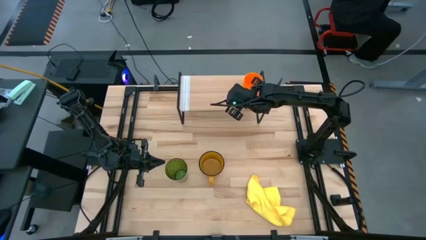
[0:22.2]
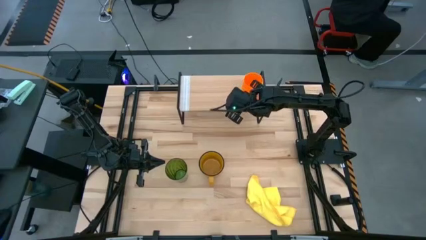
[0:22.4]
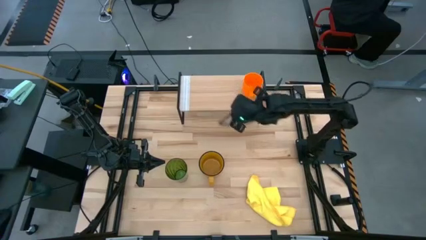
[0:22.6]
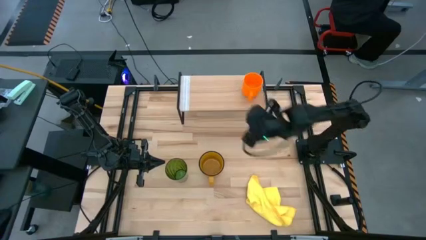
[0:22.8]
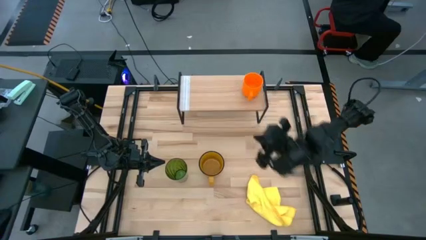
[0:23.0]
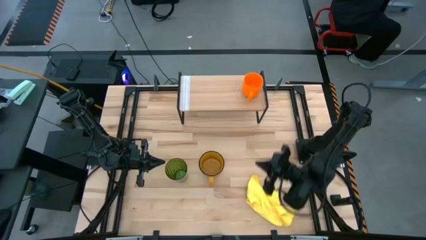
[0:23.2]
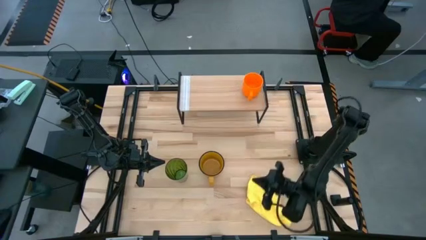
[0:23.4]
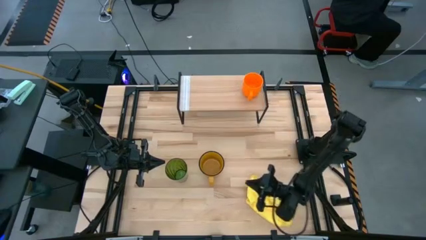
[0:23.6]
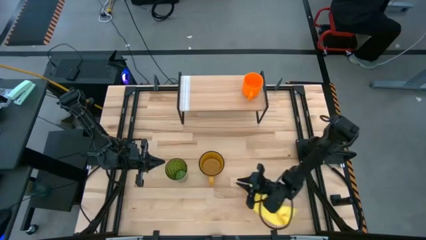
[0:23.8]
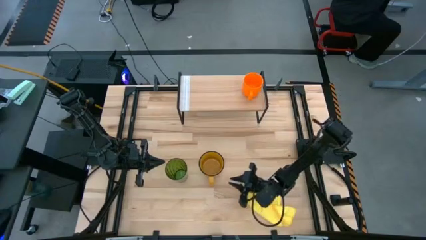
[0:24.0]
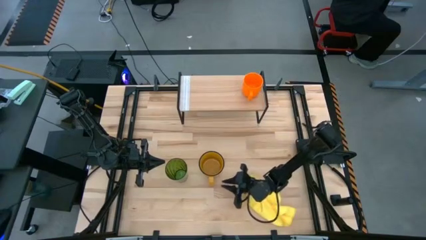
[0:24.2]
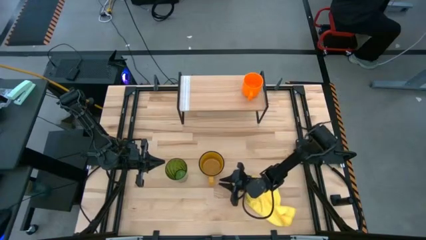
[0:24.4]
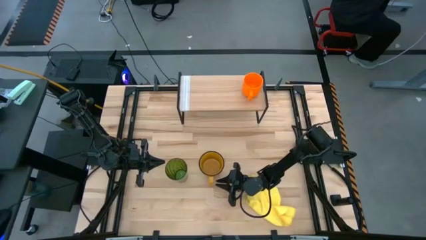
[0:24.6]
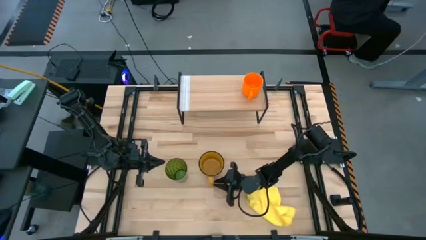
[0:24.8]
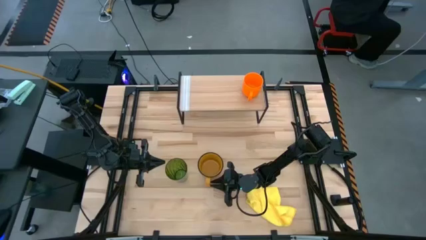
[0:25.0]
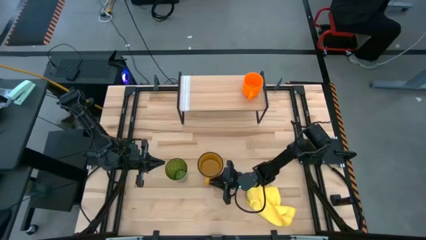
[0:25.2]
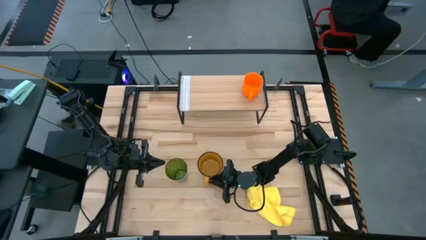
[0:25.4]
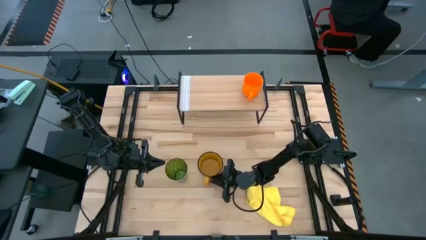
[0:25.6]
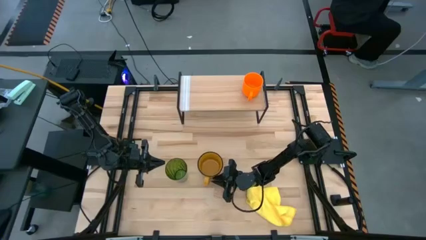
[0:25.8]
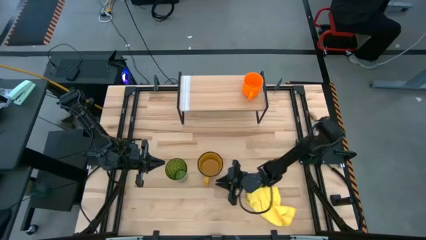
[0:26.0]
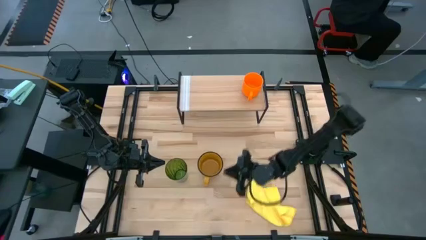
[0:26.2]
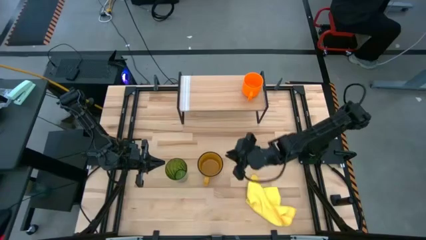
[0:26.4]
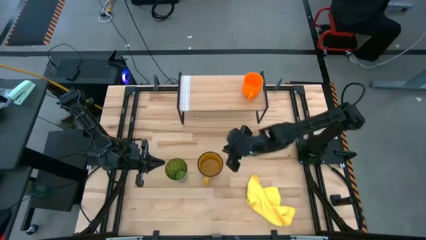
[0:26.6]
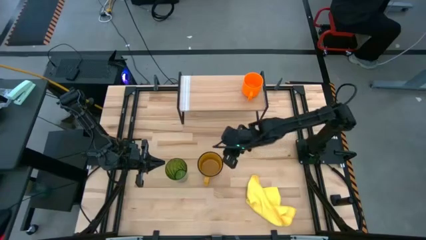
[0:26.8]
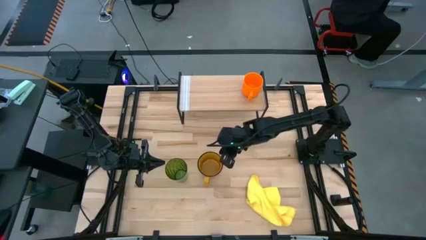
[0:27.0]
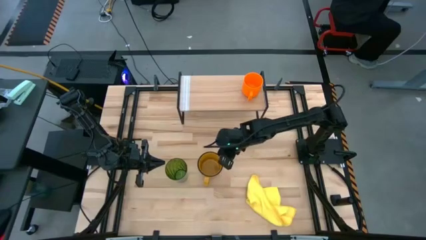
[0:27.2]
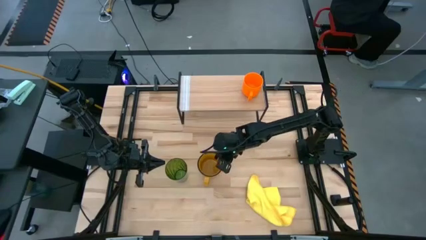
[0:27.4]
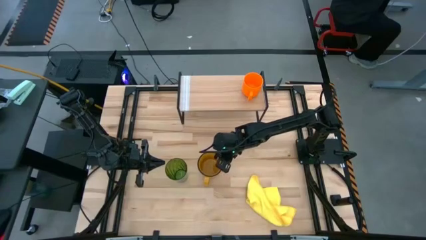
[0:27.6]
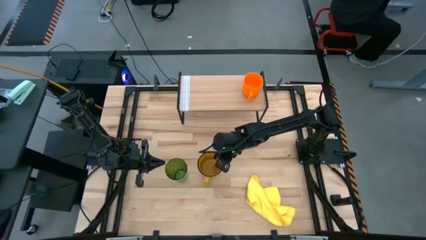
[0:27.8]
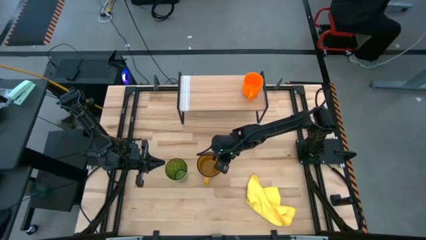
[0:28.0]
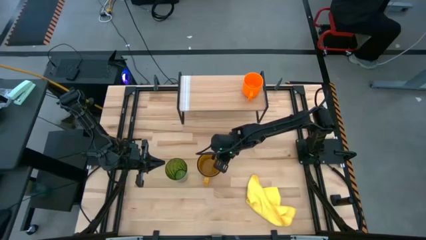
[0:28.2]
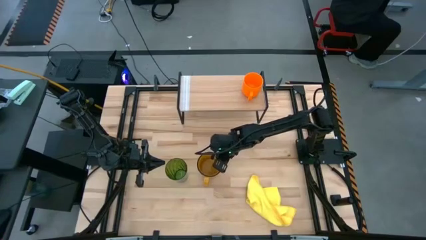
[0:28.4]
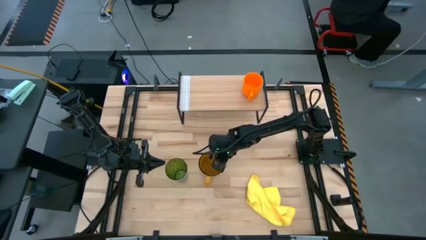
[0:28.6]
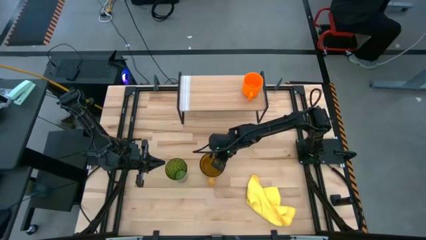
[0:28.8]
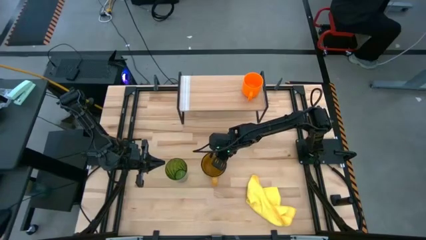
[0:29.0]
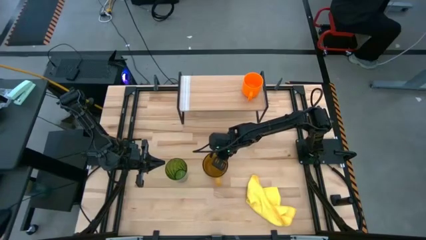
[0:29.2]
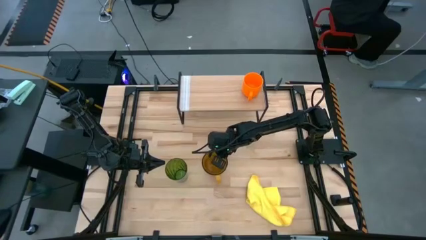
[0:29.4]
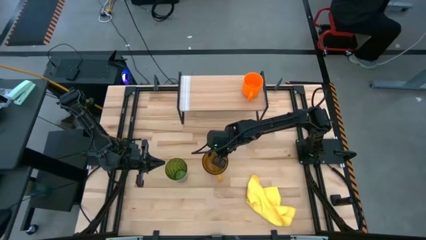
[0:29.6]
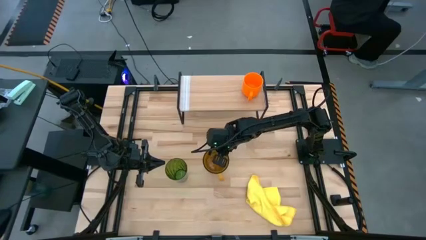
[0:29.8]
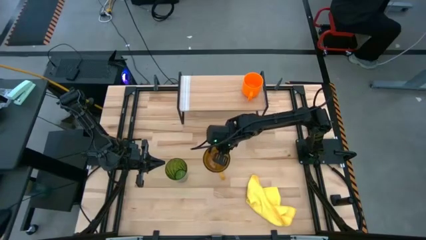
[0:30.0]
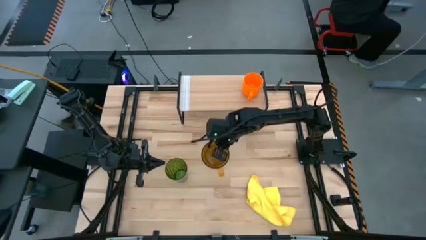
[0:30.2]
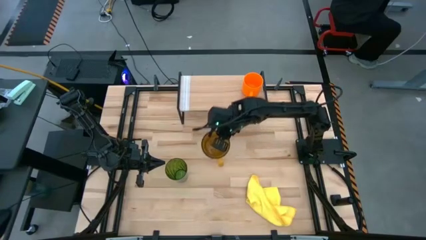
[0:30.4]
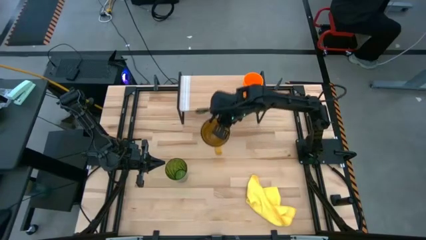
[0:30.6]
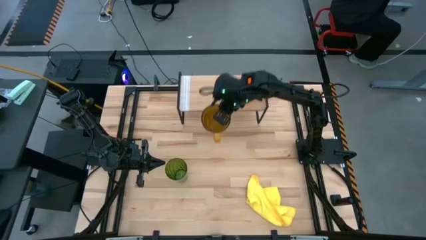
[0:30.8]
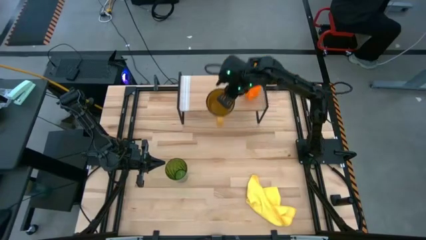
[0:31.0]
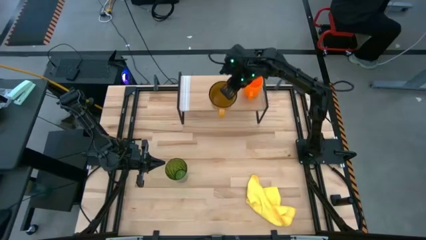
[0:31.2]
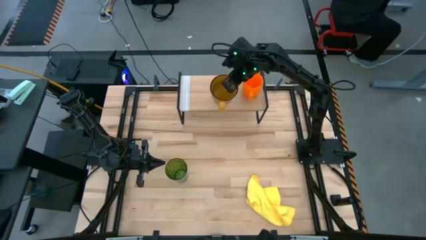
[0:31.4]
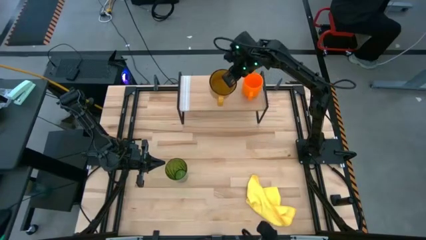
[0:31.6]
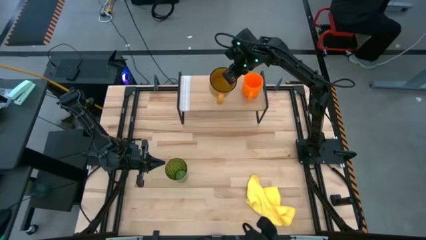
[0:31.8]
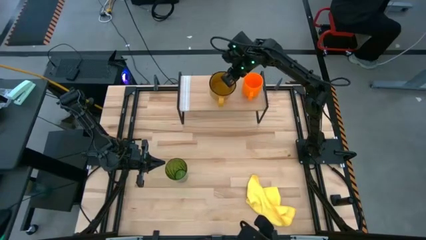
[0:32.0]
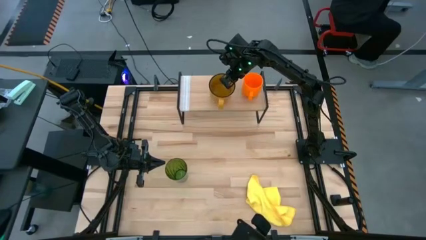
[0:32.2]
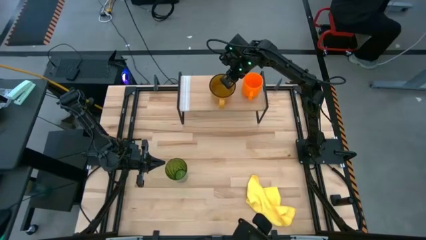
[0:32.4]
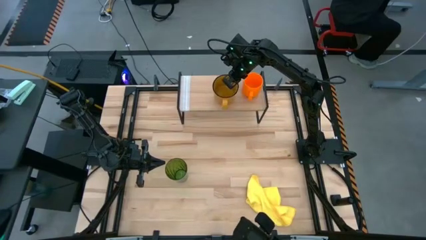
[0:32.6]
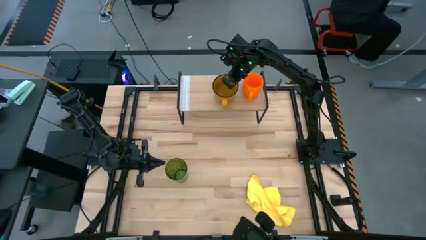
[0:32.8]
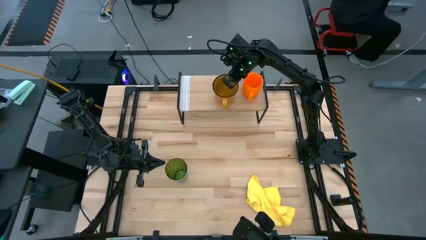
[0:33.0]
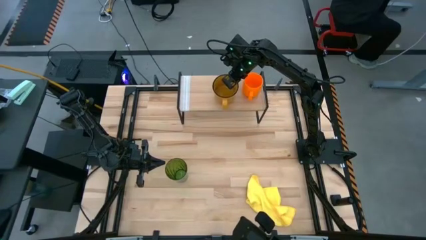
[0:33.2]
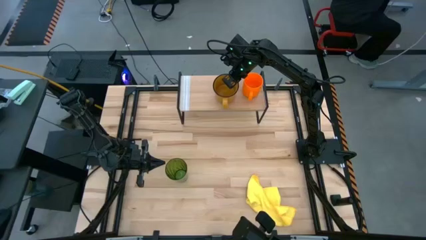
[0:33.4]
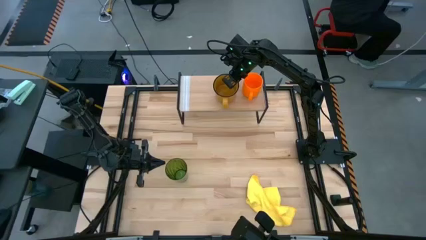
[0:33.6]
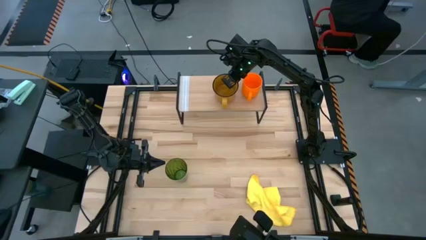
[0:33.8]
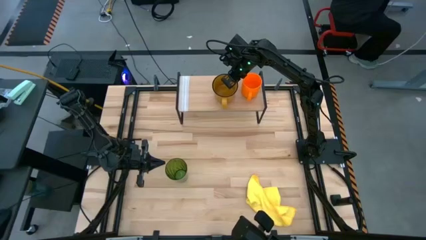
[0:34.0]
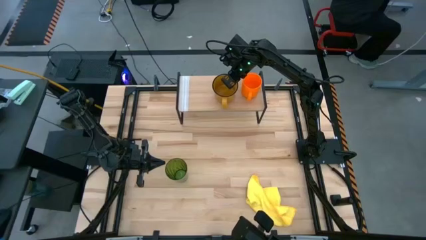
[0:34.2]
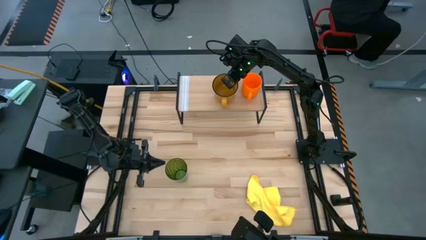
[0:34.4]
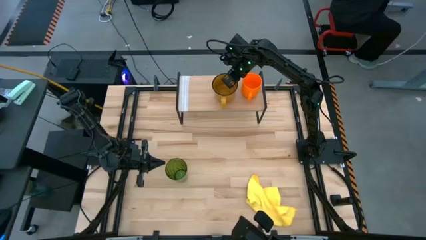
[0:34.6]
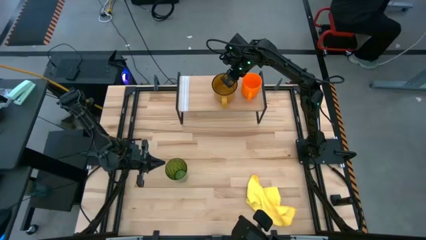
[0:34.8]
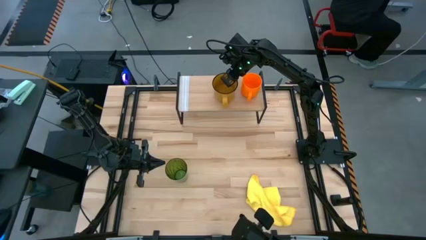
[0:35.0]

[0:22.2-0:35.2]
Task: Stack small to large cups/mugs on shelf
Put the yellow mug on the shelf
